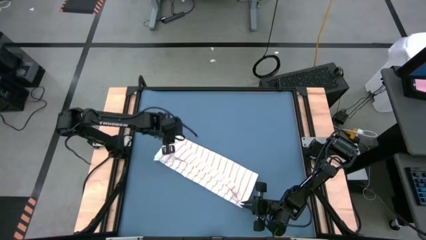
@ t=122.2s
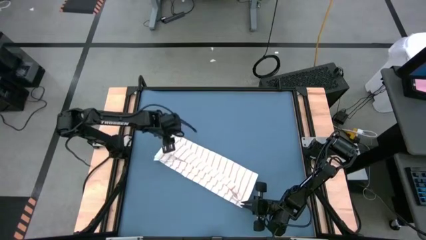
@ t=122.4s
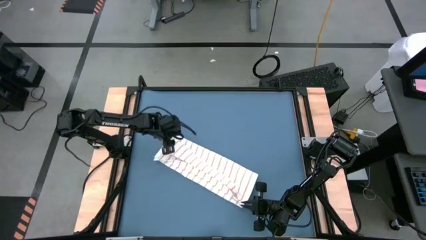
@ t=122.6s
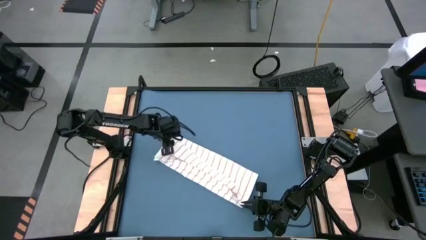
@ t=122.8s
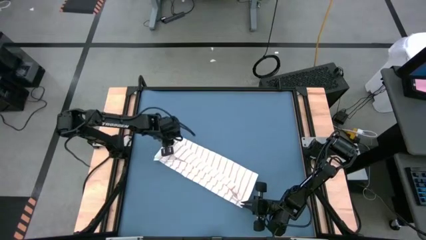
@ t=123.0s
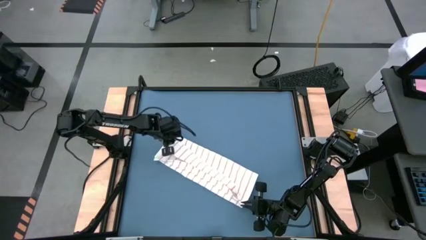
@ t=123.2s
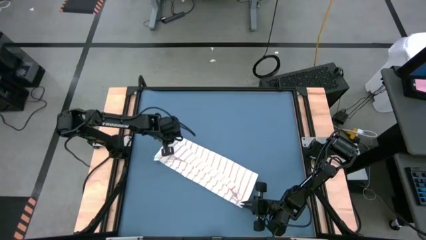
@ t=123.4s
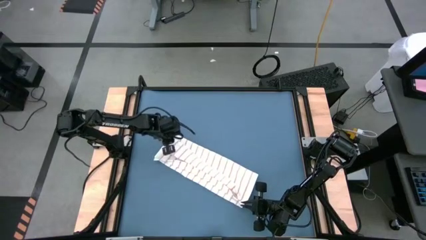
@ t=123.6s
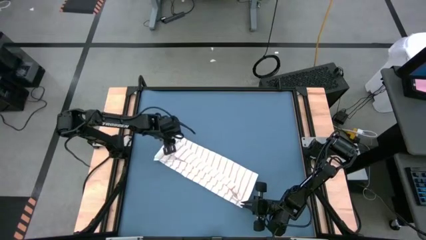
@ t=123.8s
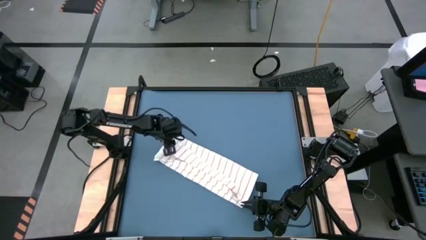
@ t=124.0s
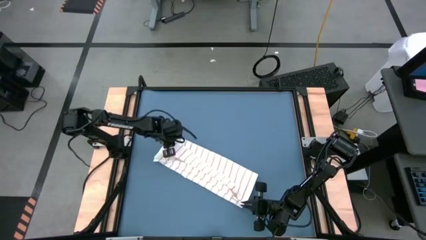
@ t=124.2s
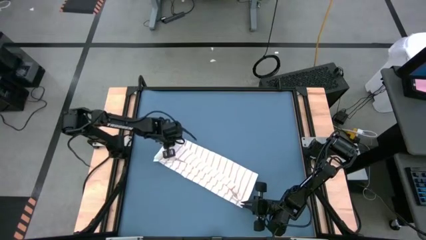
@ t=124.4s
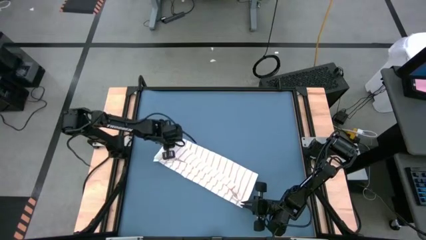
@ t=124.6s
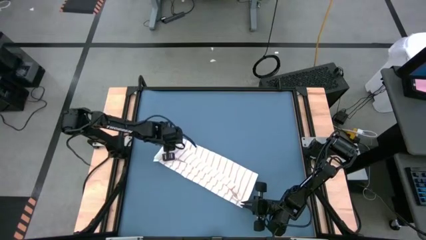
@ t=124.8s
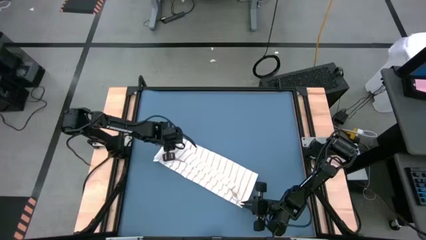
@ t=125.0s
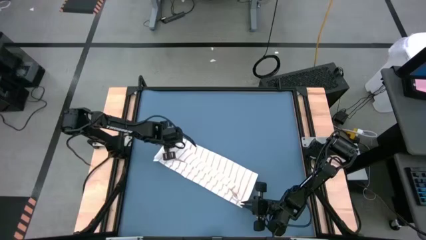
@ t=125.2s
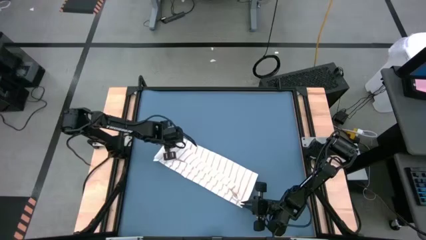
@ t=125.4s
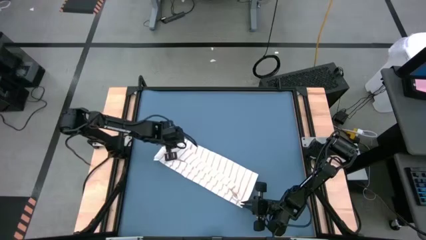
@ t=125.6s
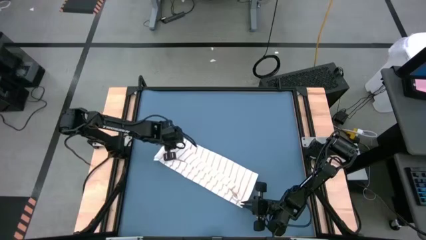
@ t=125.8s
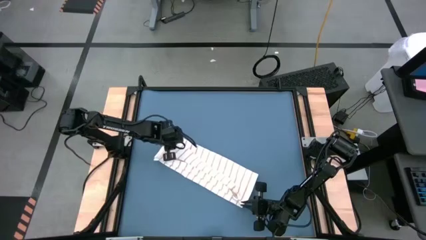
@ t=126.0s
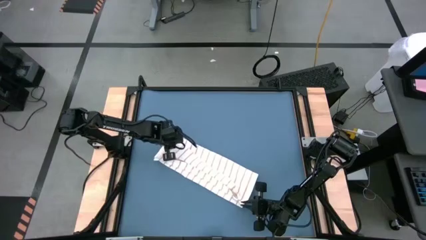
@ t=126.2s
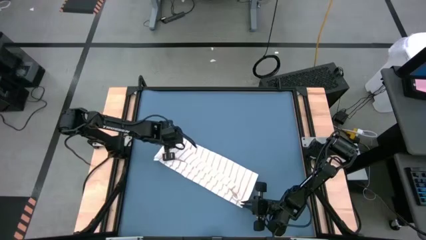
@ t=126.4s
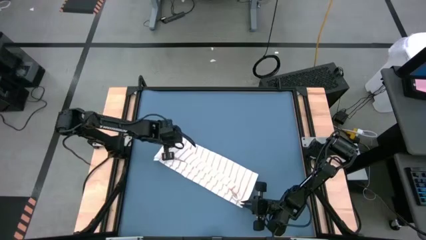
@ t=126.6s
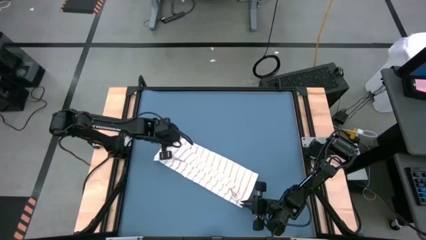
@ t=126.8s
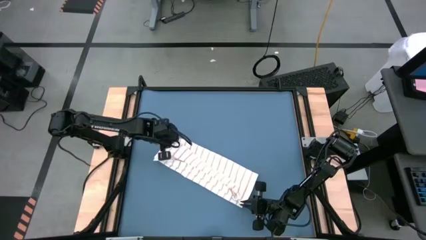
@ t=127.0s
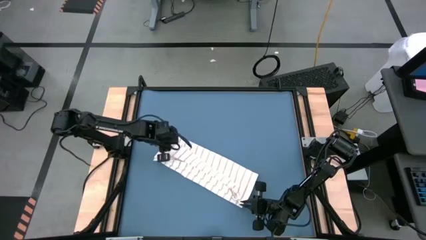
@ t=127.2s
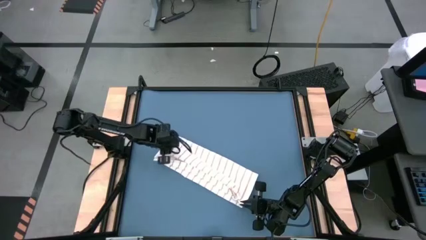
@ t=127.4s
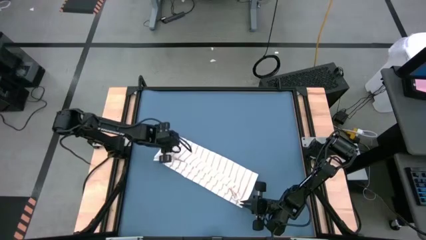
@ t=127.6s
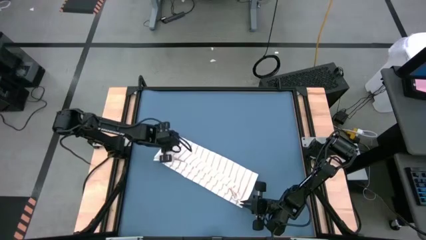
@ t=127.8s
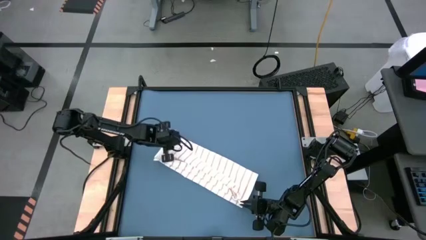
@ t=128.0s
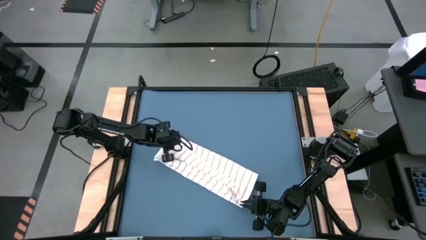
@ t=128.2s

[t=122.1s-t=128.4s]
Task: Roll towel
Fold the white towel

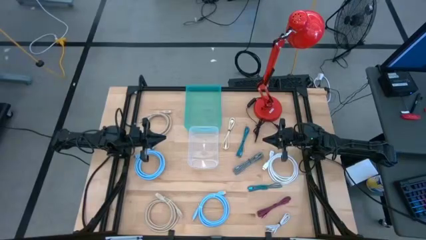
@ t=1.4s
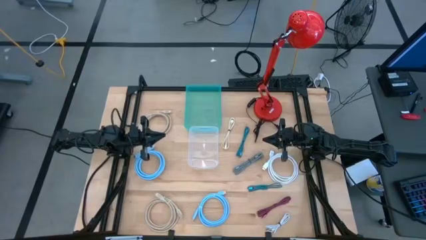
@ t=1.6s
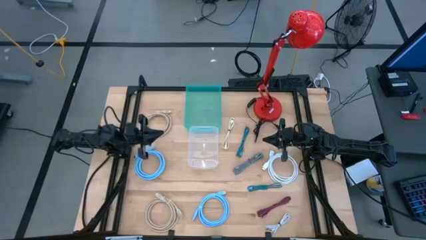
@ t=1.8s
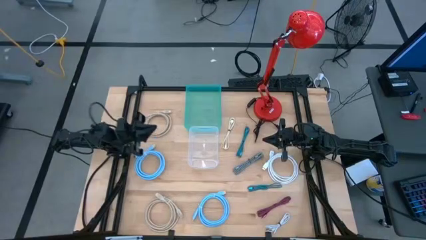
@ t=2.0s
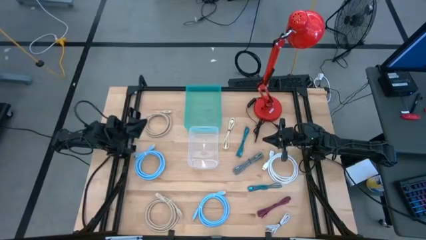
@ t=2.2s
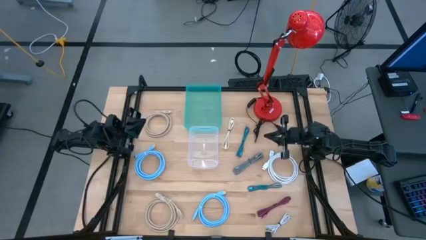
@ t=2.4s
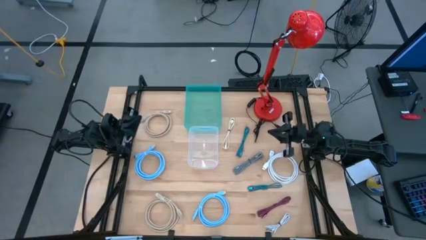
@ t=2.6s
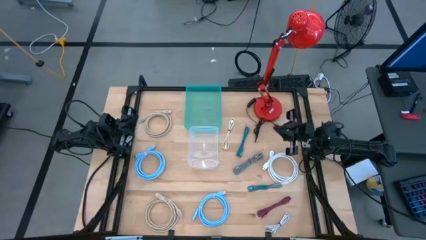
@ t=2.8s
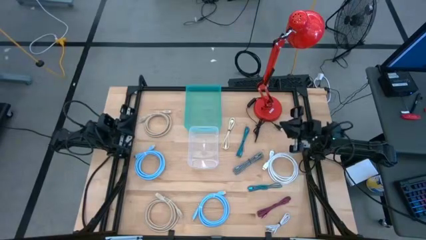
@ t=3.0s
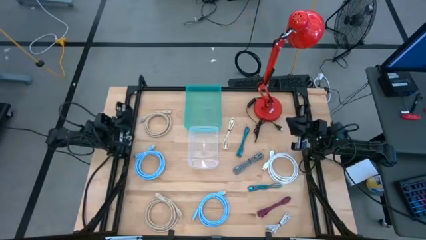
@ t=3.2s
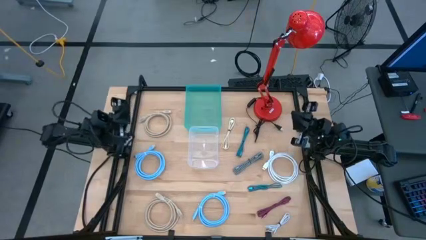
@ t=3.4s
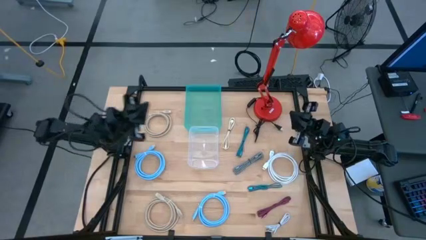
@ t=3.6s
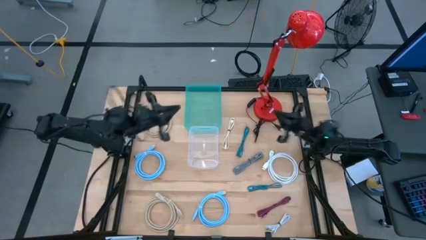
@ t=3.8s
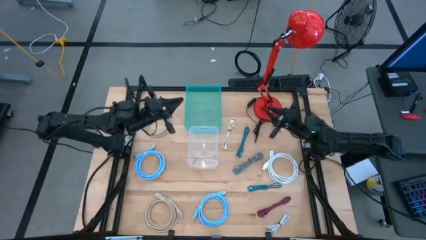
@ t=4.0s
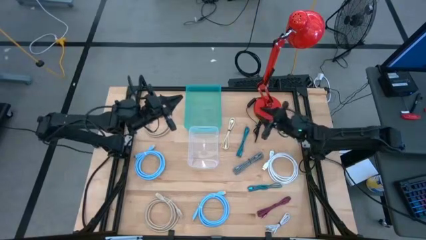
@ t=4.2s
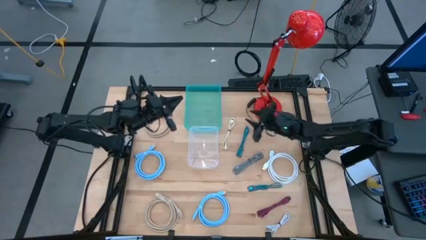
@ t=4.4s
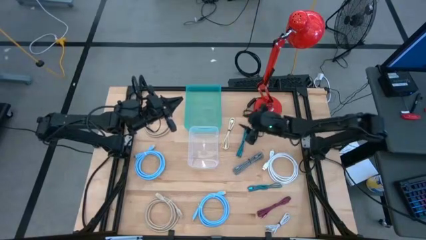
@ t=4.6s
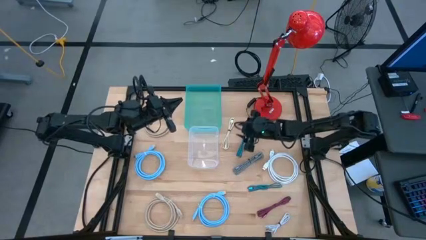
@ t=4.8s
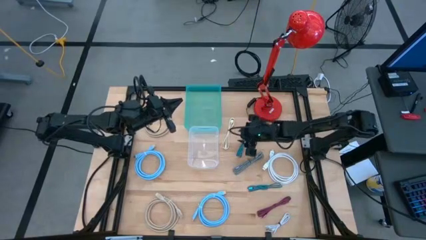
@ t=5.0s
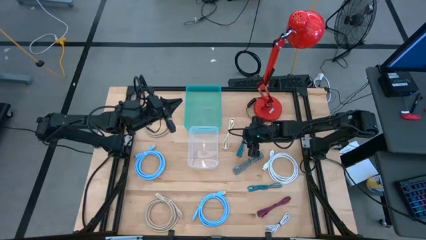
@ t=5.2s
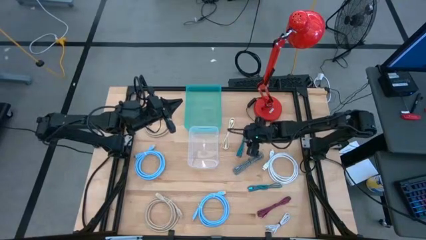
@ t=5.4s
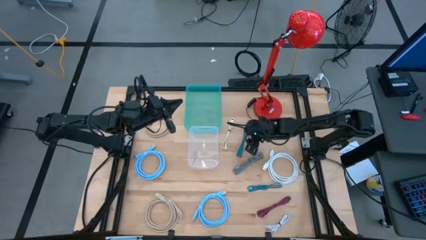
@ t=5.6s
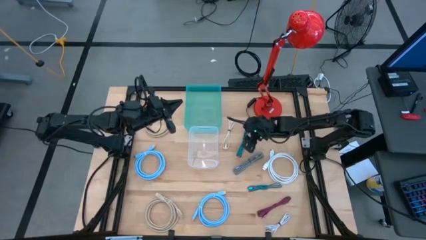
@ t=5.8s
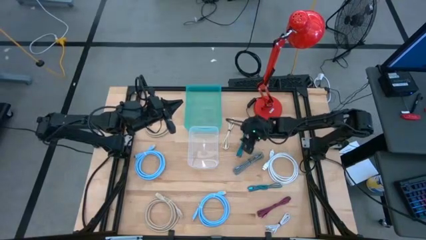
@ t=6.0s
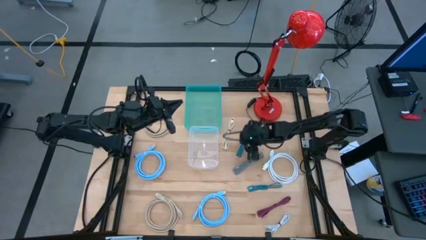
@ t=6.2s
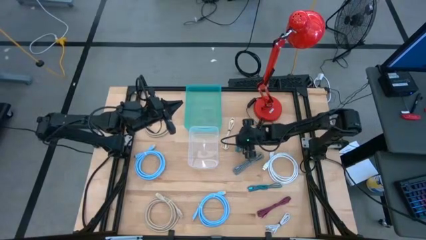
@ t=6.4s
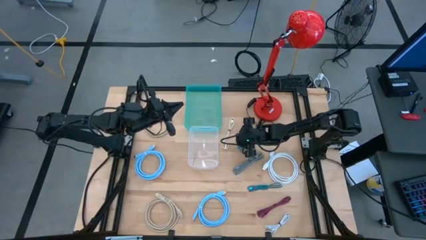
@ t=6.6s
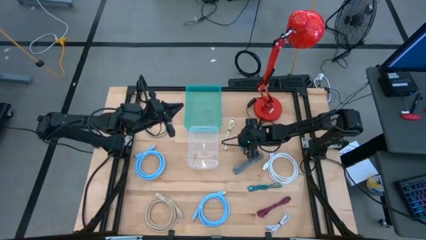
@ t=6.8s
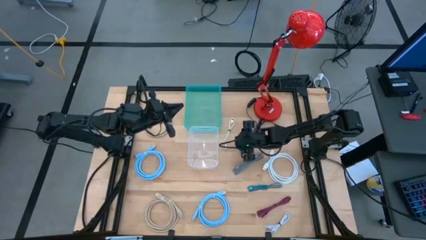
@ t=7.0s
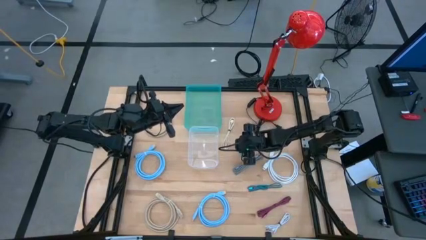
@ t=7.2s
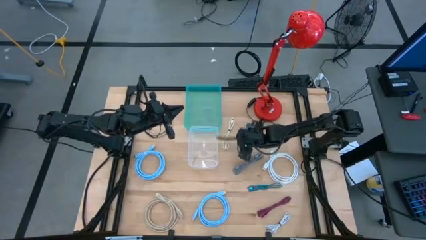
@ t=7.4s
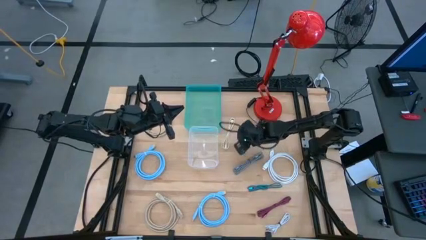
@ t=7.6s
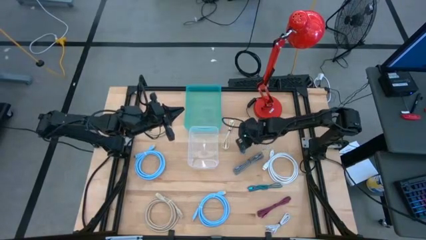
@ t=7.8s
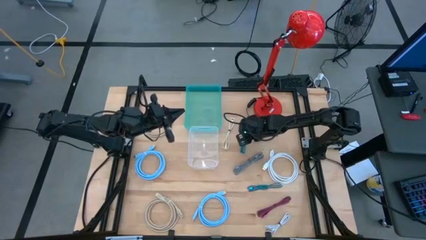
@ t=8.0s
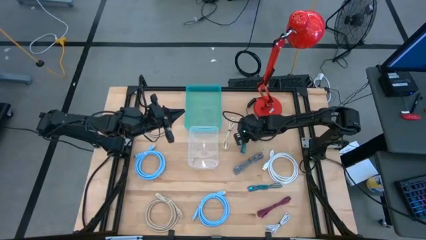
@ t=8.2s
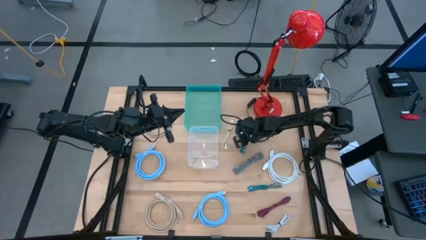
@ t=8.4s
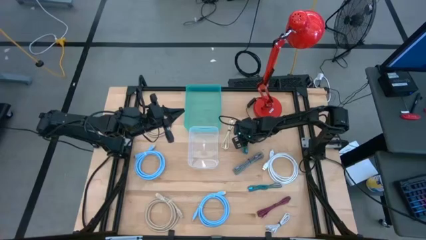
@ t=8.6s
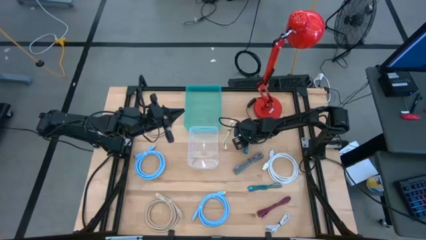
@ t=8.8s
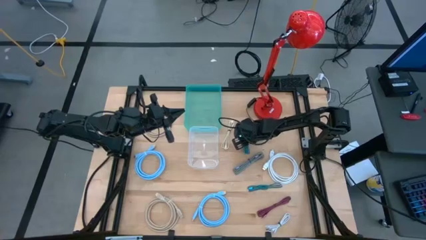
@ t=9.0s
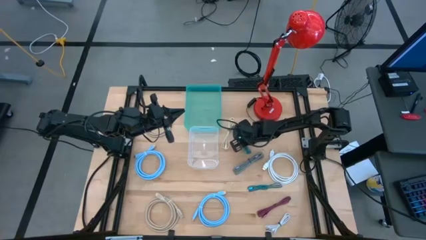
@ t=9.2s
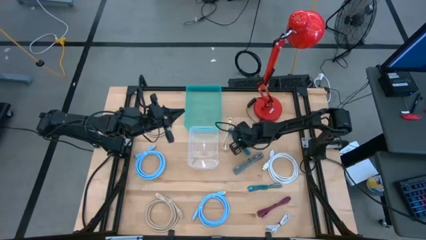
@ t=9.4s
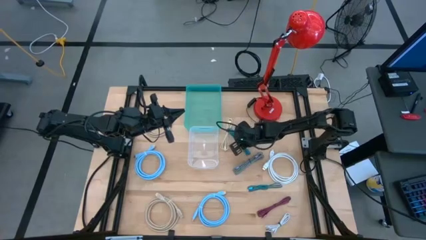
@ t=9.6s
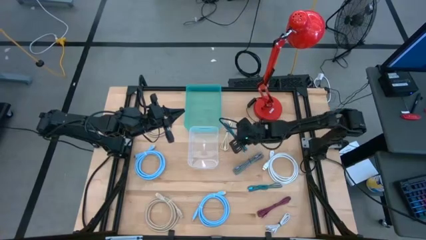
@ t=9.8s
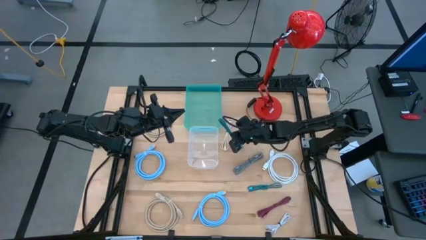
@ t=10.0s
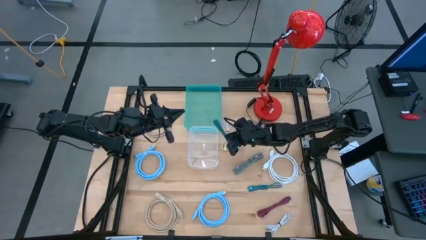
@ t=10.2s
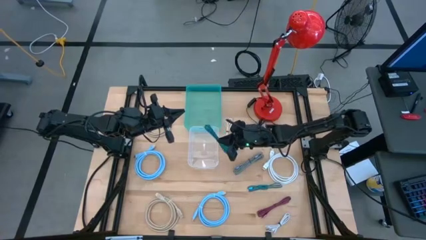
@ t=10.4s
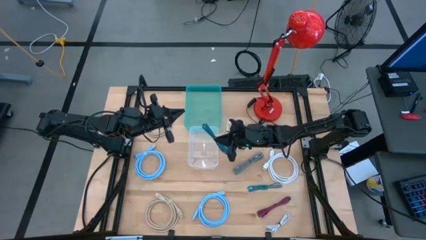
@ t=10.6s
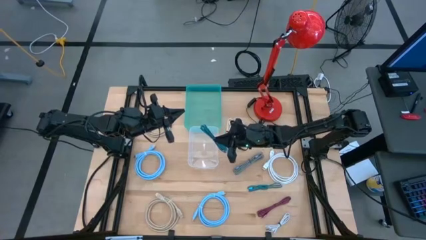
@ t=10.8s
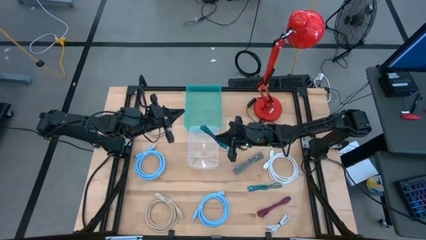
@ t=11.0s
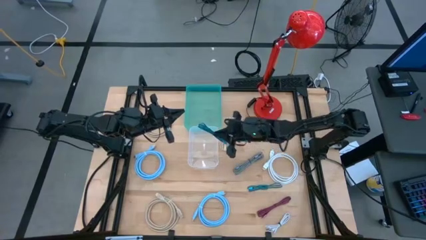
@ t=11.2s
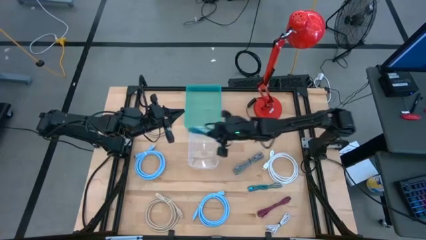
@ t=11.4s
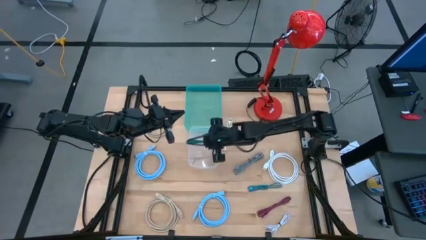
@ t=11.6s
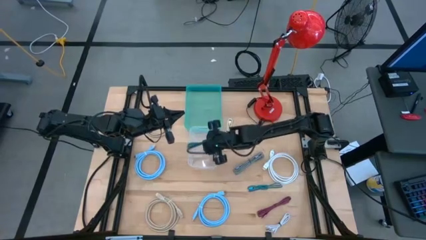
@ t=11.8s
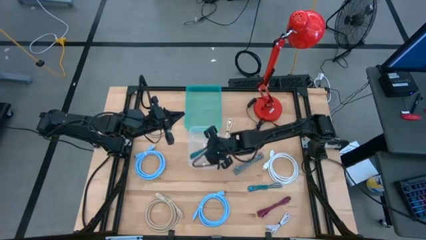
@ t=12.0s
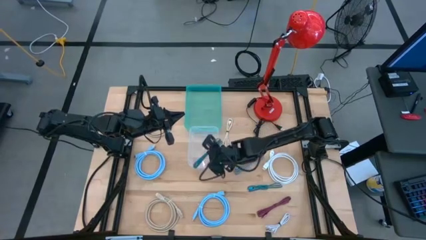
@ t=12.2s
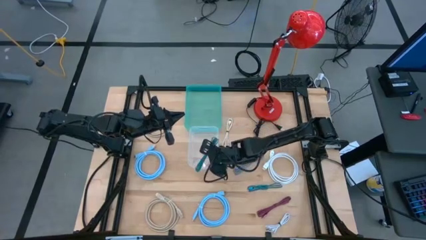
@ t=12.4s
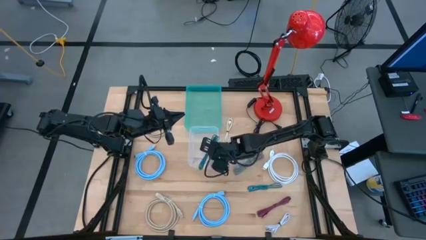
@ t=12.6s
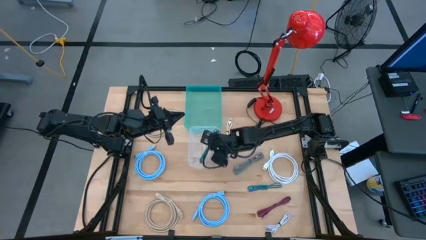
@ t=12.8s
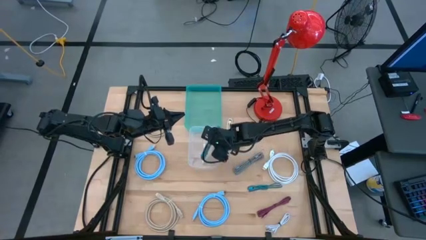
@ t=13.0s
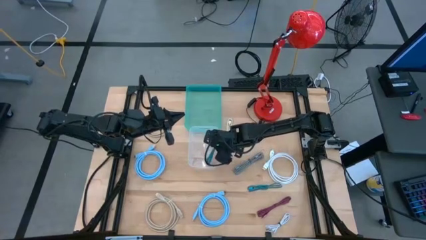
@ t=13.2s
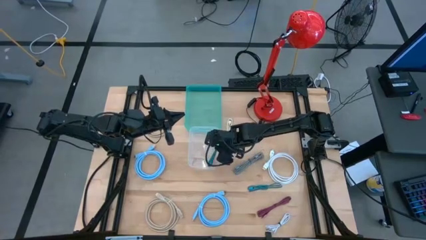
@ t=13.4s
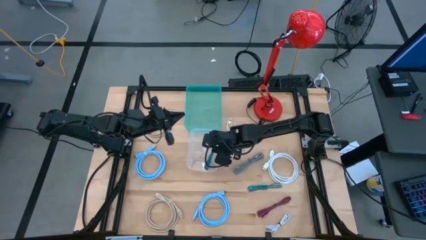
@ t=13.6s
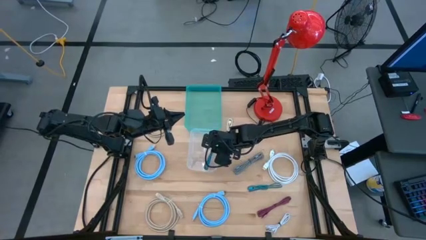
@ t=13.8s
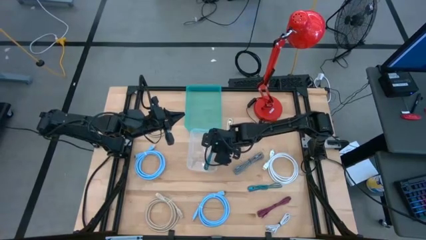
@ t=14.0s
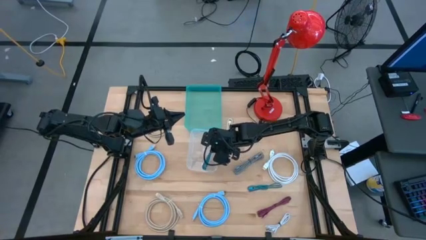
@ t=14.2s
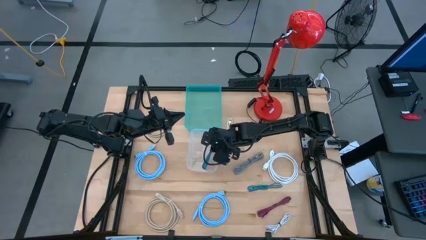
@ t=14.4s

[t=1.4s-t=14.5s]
Task: Pick & Place USB Port
Put the top blue black tied USB cable into the transparent bin
